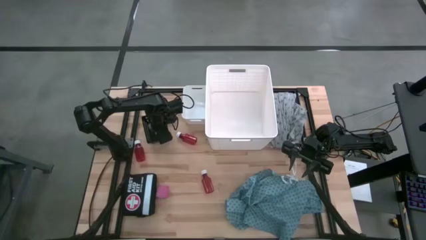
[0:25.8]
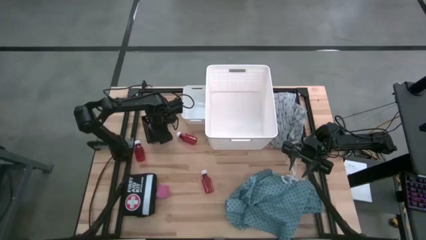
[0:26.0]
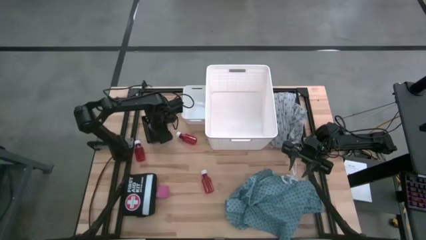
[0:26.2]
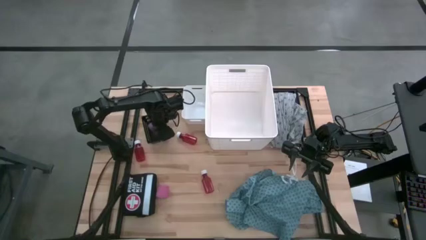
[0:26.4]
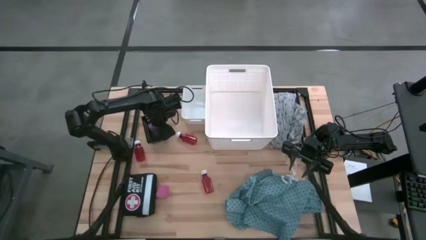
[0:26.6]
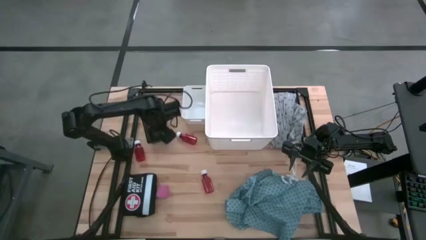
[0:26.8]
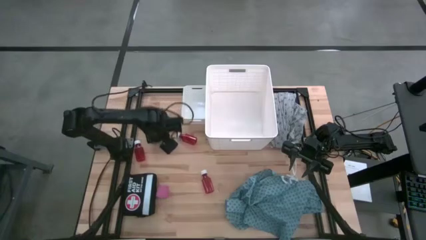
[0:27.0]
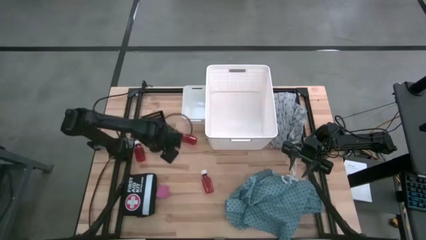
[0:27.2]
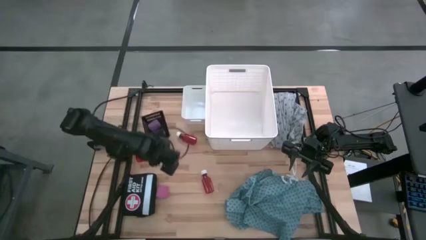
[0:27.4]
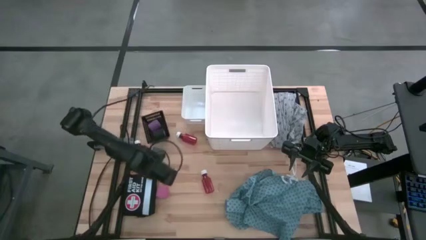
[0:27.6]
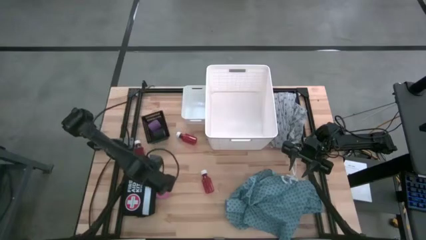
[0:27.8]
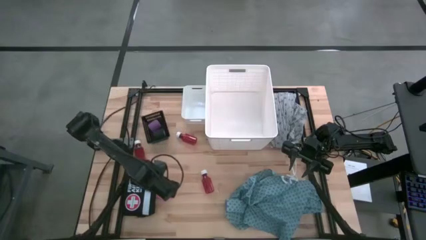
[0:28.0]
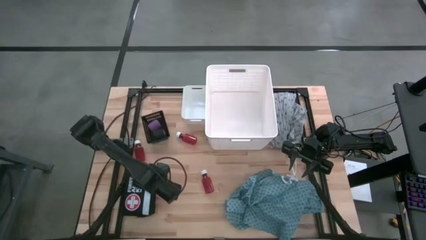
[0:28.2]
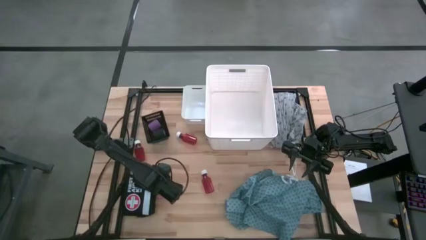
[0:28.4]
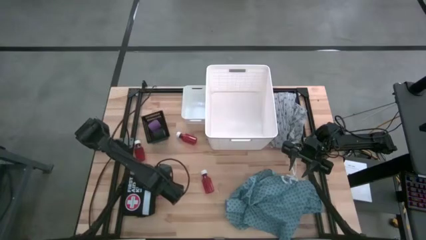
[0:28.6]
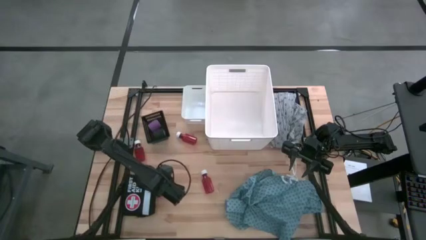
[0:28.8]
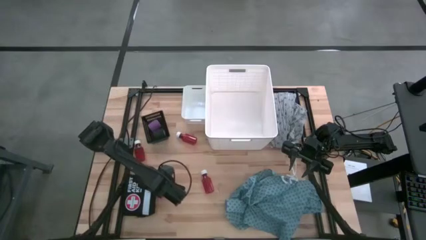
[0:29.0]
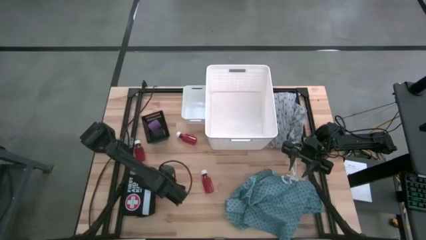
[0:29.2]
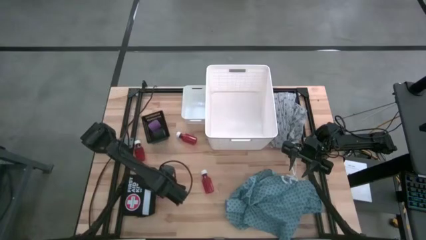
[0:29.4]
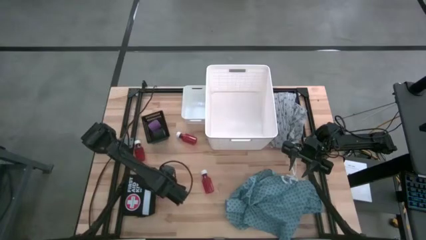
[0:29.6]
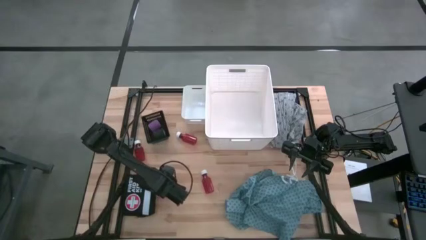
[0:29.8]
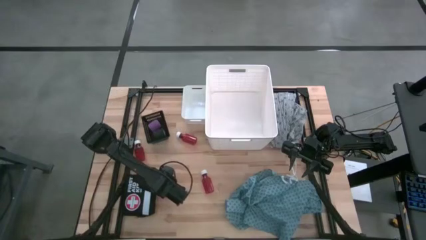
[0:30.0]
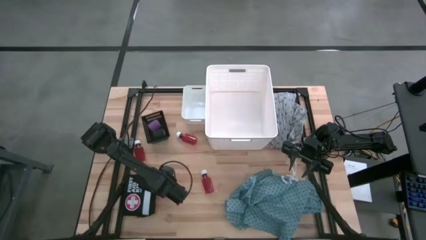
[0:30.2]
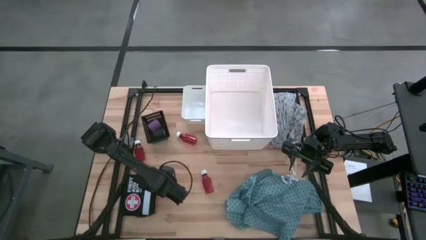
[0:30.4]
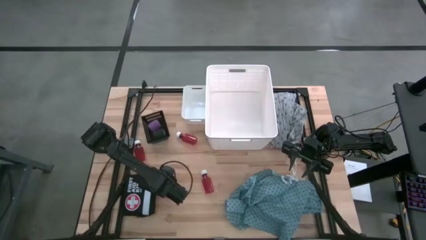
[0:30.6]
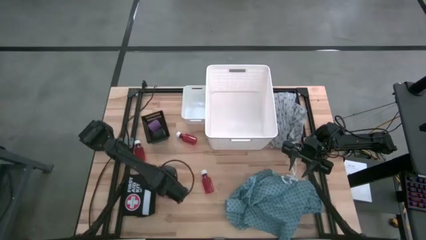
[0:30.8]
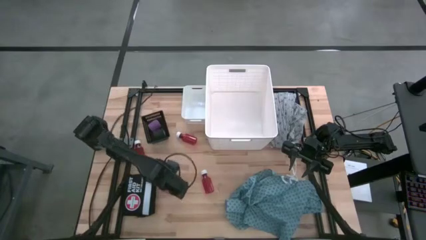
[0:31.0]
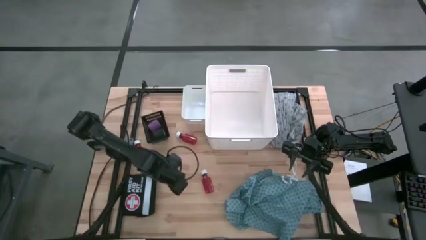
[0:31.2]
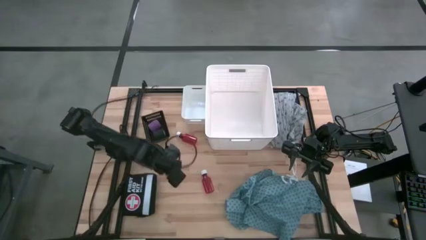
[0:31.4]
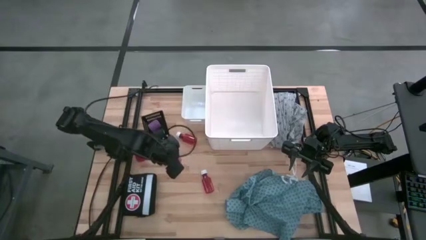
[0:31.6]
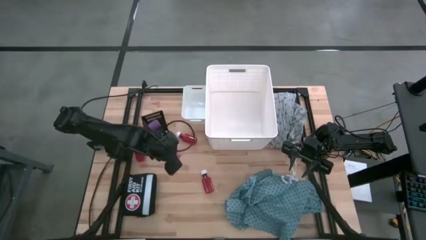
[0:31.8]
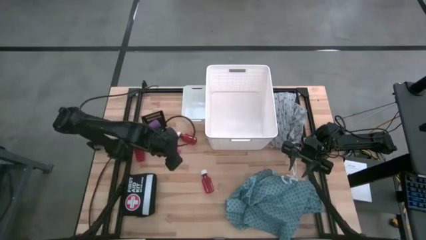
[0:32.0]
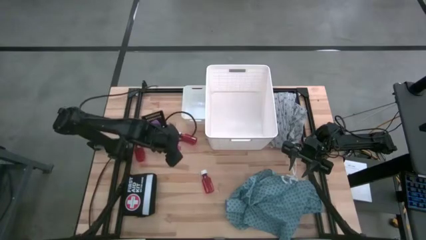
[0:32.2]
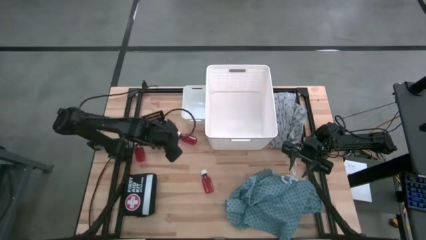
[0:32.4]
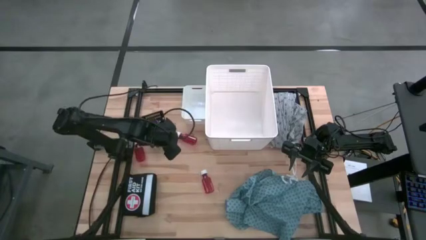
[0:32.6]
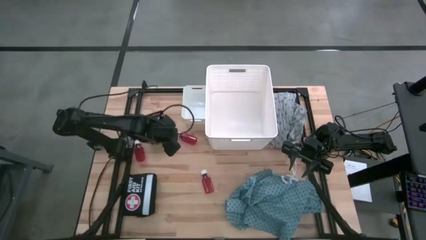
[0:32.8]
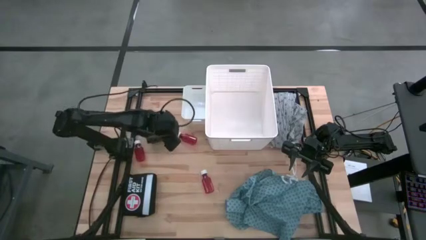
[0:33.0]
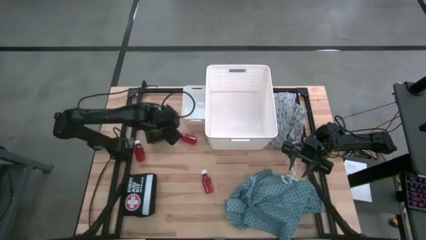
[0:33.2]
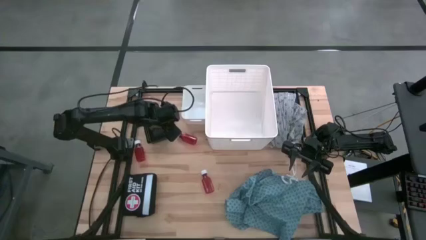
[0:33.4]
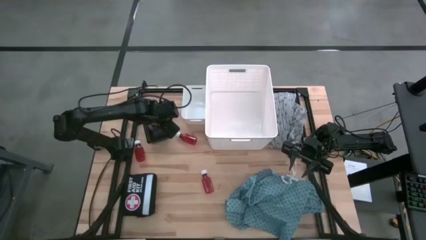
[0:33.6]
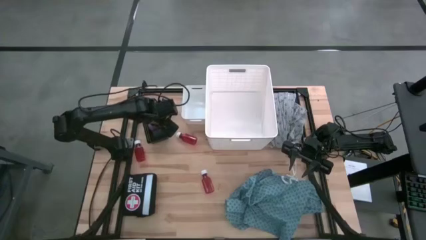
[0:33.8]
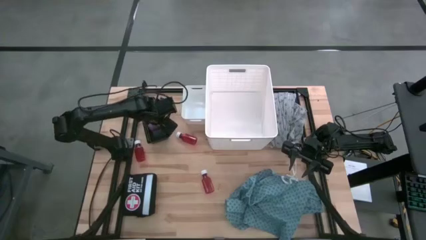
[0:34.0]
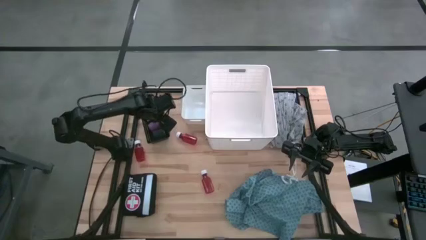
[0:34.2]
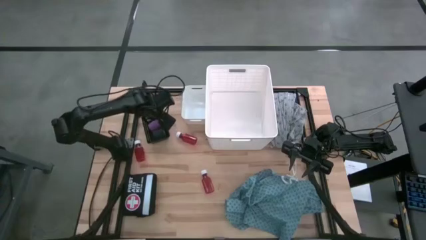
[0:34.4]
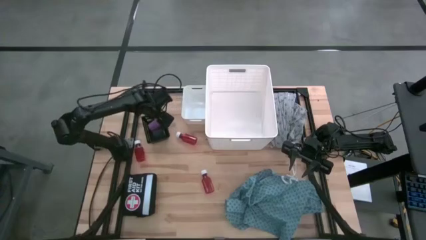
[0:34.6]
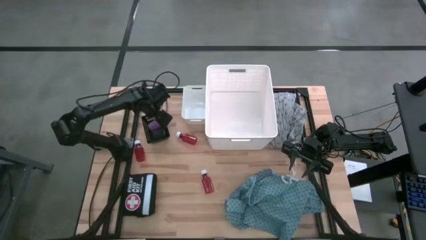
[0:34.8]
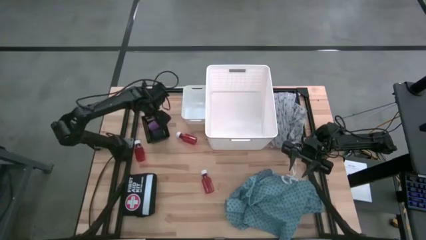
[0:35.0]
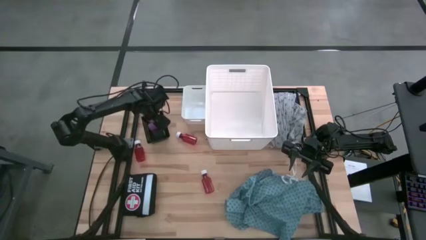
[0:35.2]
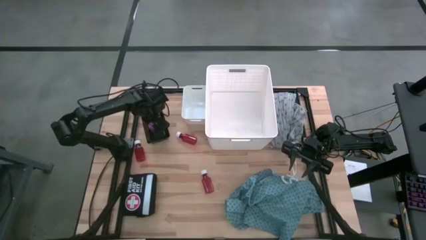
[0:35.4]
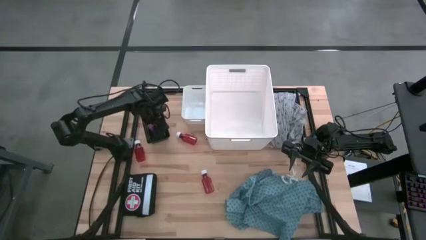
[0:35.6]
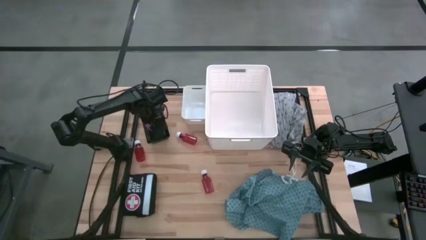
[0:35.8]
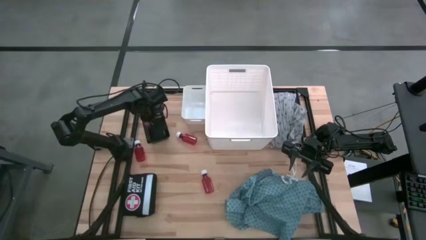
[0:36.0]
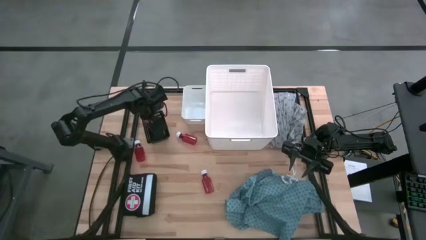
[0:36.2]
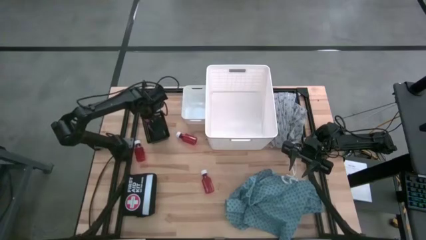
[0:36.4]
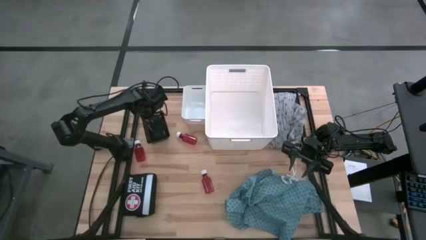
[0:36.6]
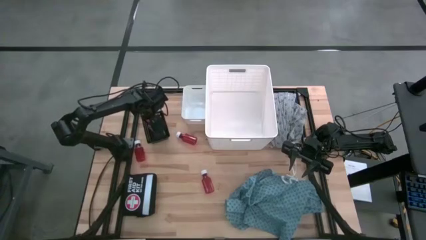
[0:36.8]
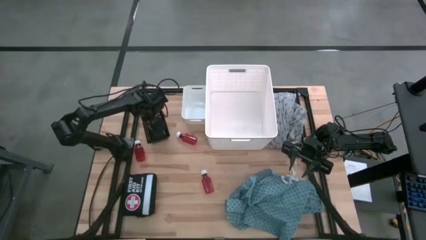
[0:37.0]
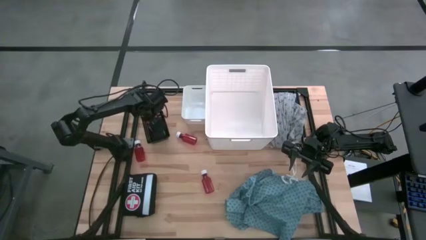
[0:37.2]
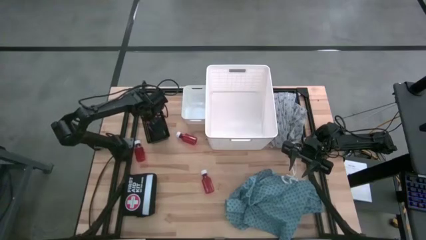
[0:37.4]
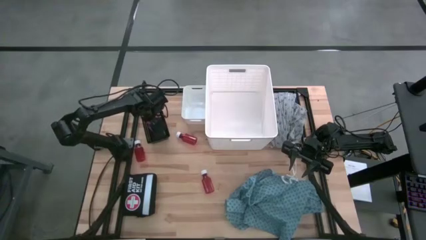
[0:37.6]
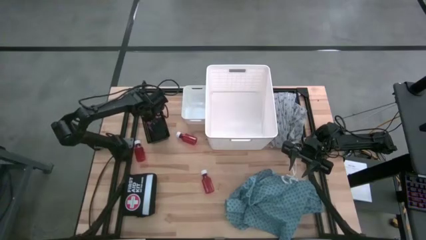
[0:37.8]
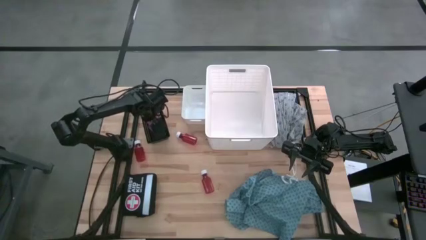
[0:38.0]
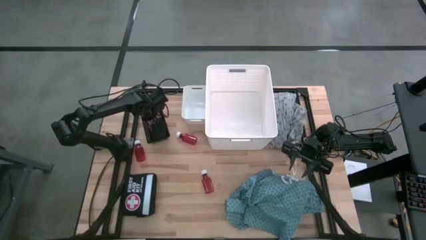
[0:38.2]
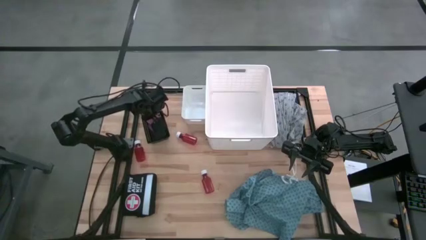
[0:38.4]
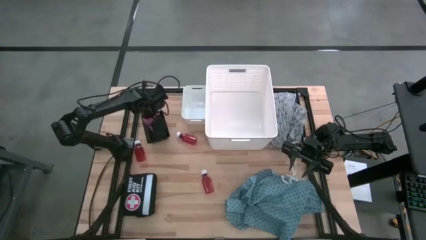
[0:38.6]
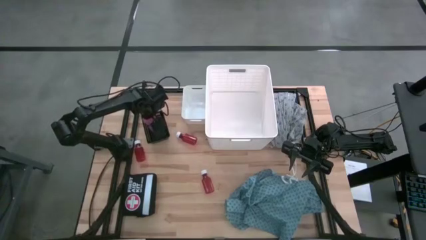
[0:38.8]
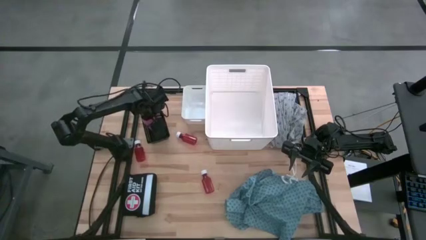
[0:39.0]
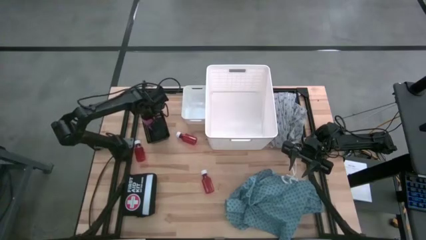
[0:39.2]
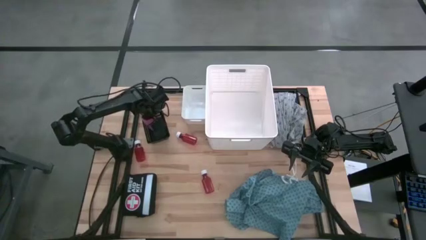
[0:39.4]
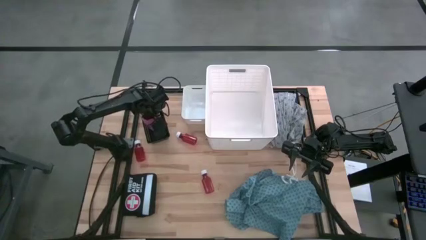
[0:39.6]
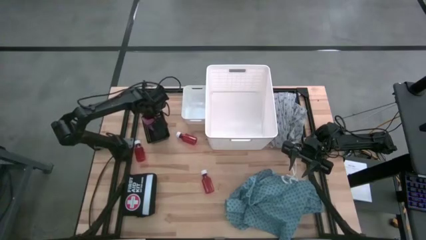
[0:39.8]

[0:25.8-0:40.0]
Task: Pick & Place Medicine items
Put the pink bandage into the black bin

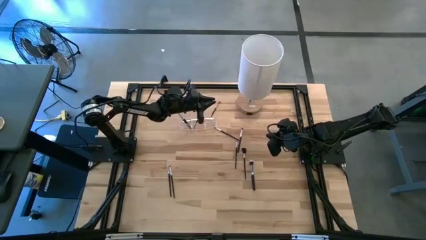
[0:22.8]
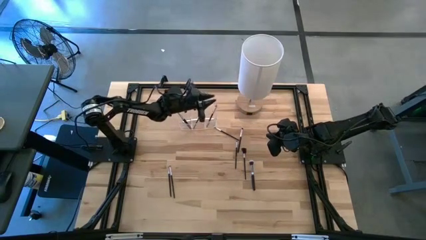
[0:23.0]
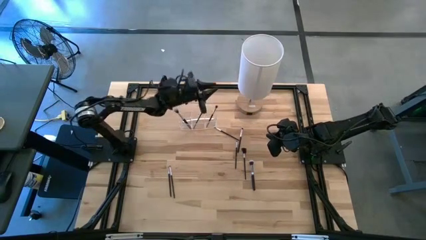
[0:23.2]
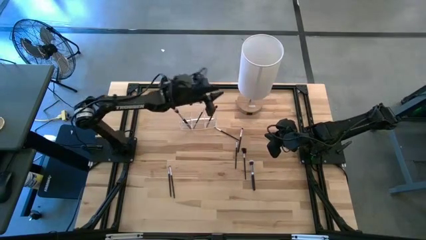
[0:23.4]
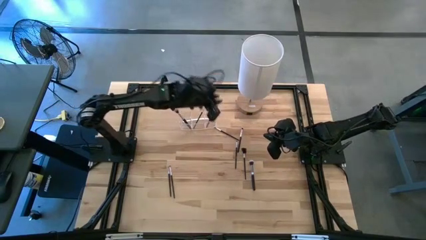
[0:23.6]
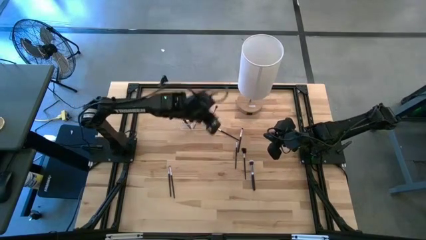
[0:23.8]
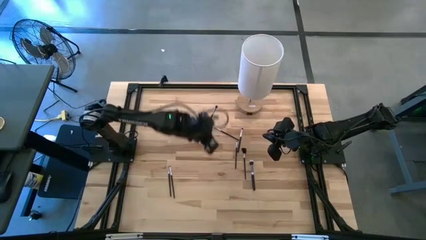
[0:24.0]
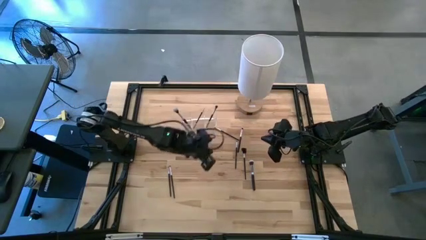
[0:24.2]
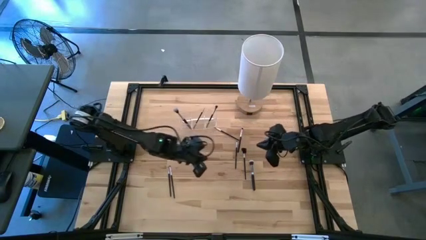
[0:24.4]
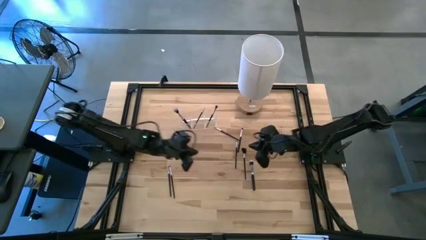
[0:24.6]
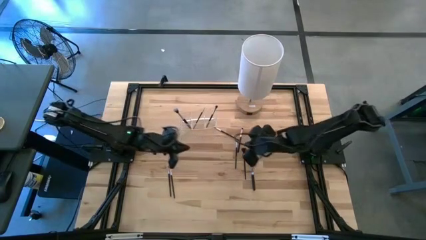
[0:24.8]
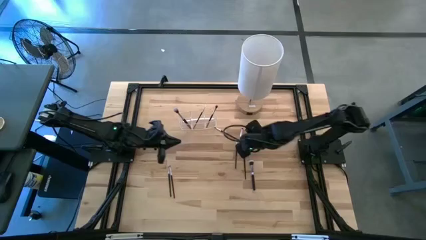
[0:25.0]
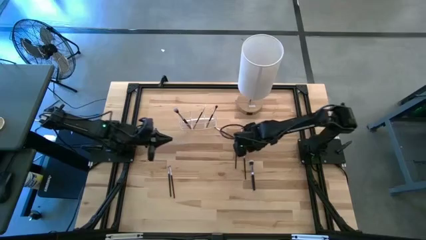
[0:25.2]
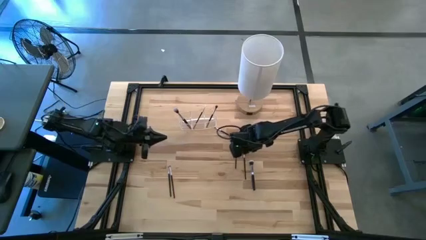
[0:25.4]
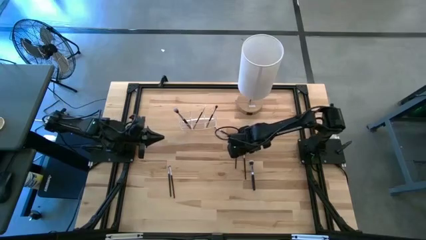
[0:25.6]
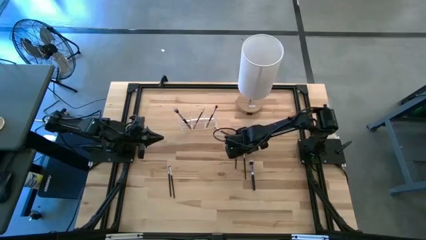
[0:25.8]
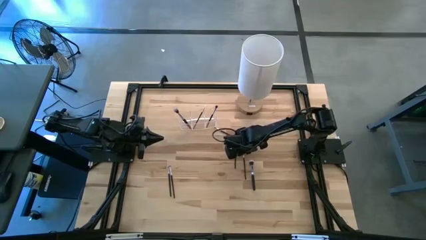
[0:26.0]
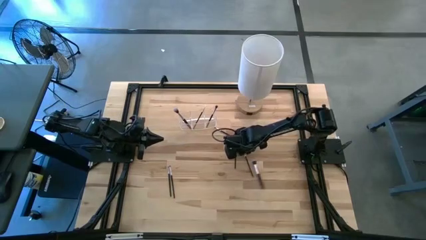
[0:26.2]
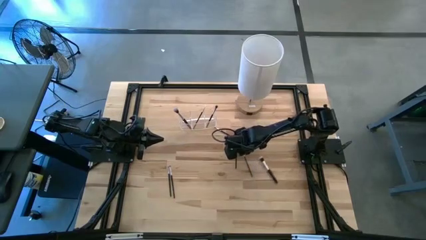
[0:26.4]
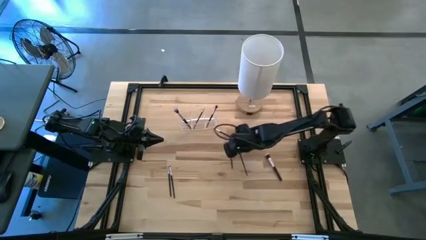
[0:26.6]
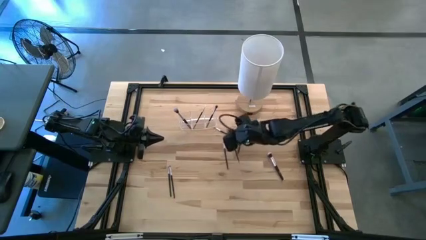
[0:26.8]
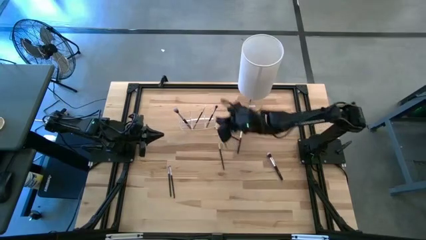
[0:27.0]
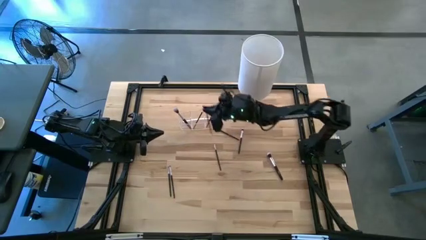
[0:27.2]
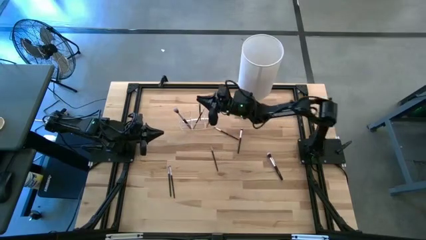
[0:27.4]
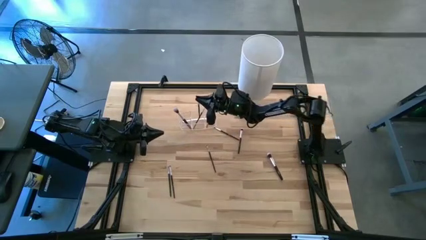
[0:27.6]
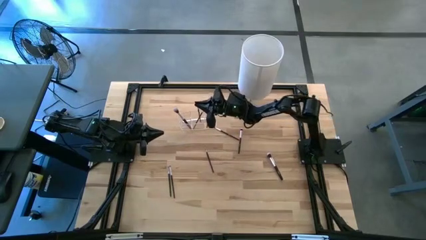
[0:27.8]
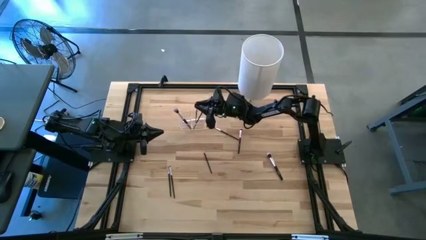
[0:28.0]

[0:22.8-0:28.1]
Task: Put items in baskets/containers
Put the black lash brush into the transparent organizer
